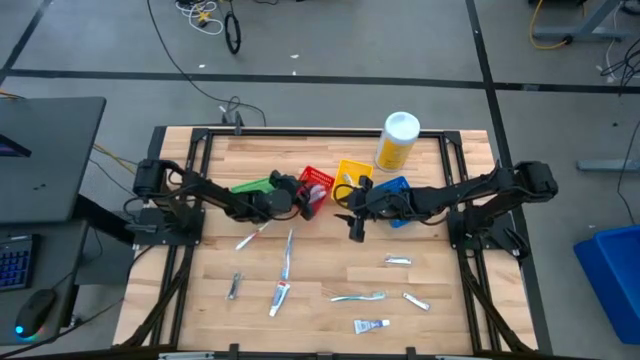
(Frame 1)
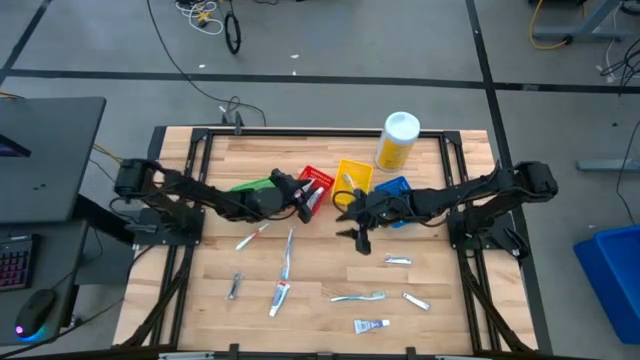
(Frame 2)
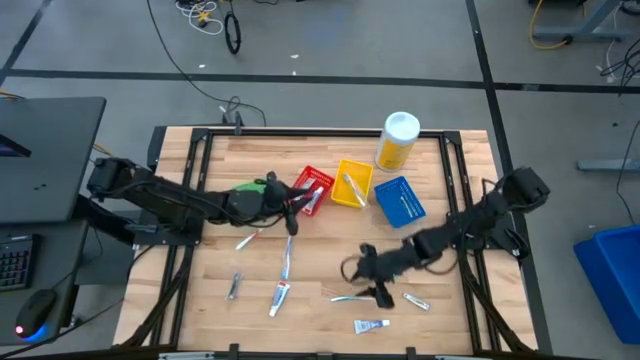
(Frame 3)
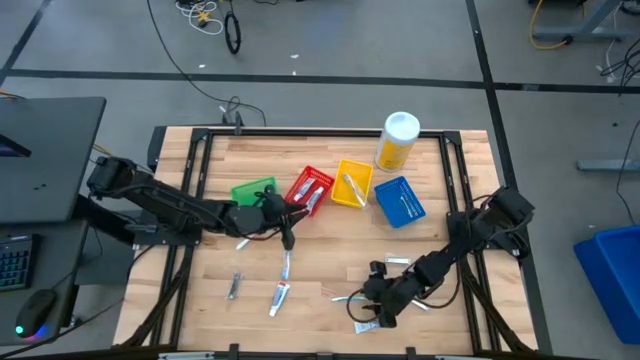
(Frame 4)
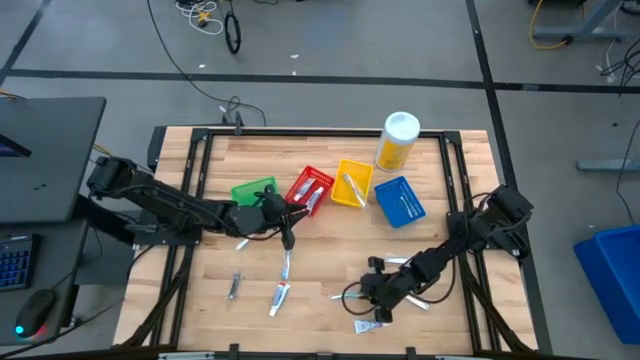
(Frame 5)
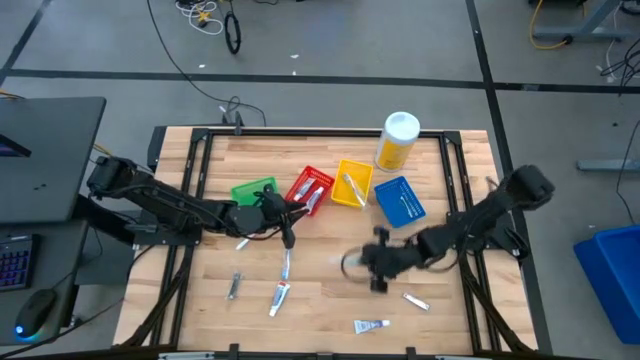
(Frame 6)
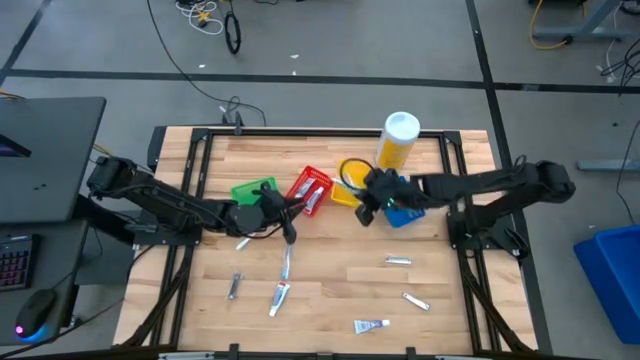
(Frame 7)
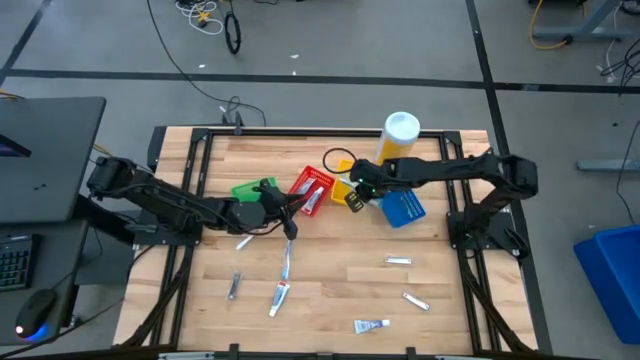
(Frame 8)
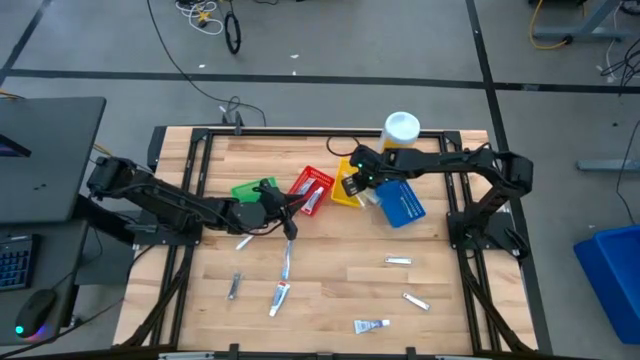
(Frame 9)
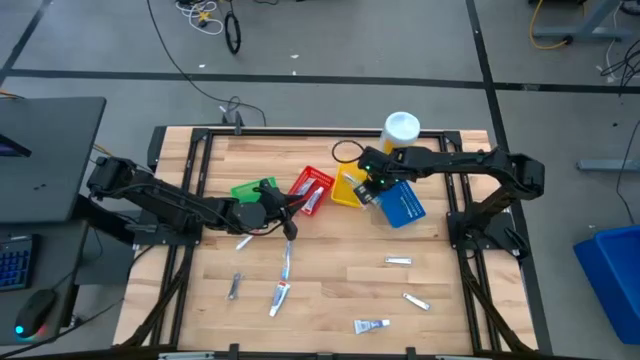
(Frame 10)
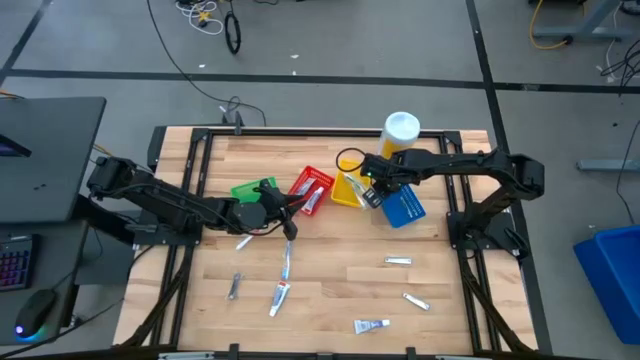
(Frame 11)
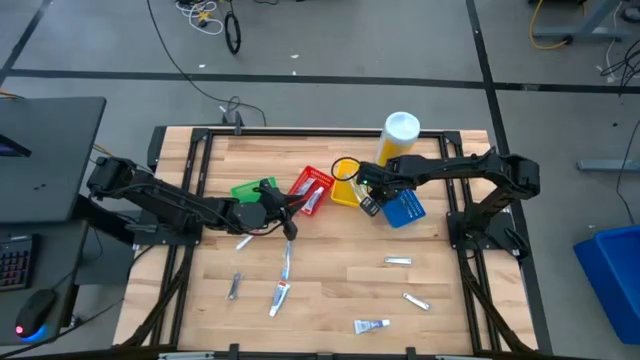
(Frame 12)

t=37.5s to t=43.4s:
Task: Pick & Place Travel size toiletries
Put the green toothbrush into the yellow bin

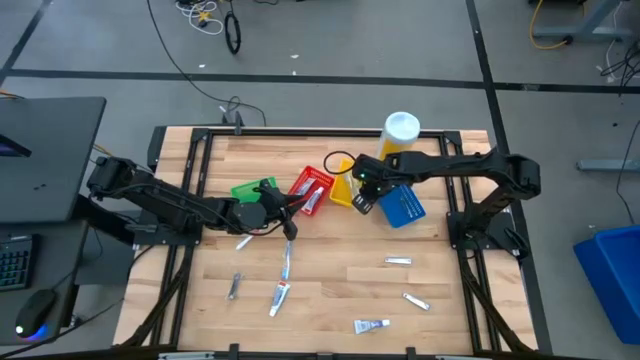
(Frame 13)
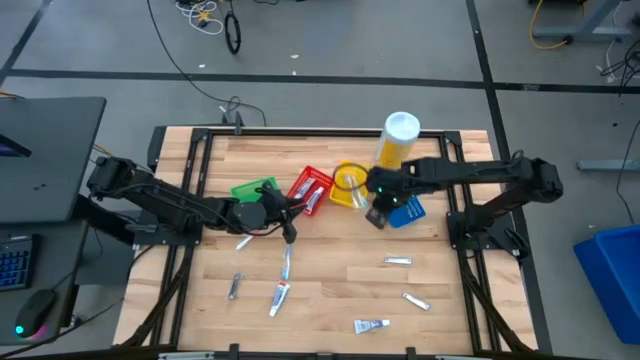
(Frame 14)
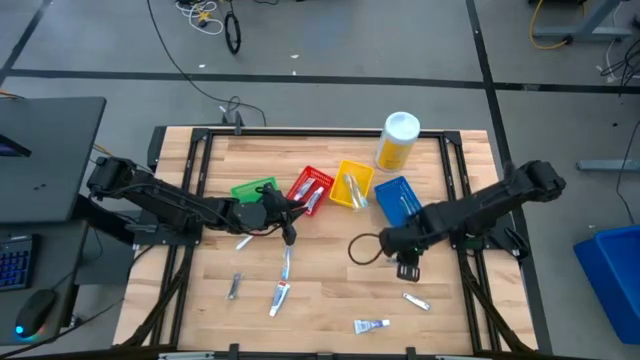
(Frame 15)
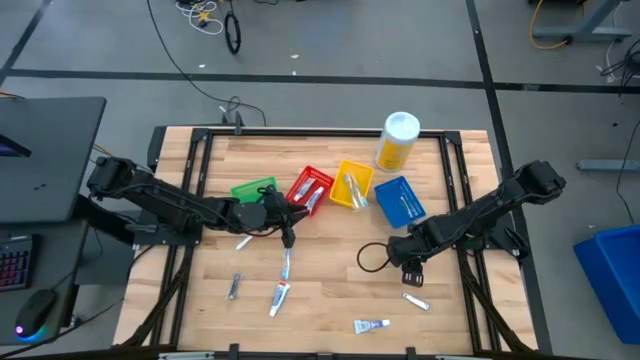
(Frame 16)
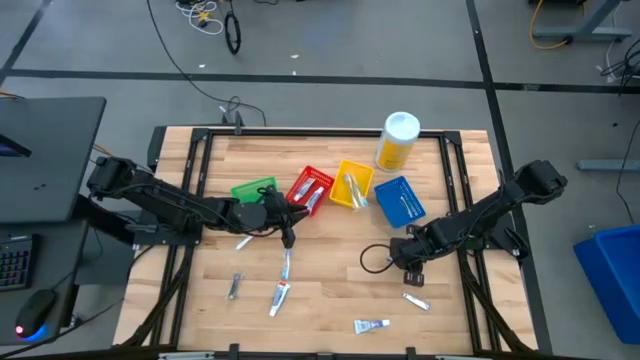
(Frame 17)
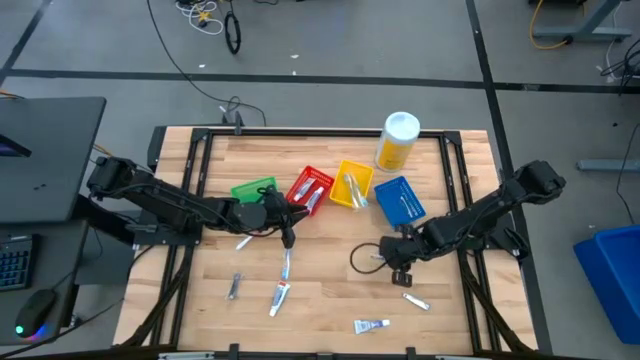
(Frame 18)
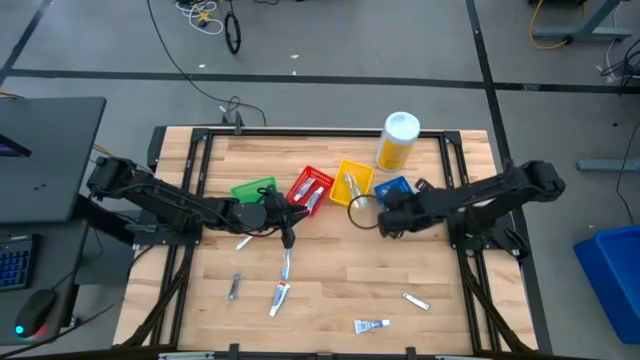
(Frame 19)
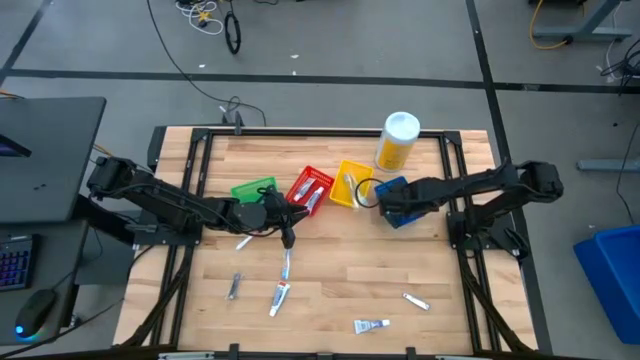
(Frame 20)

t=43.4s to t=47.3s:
Put the silver nail cutter into the blue bin

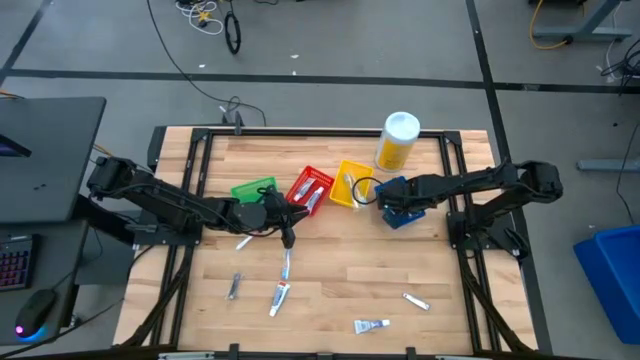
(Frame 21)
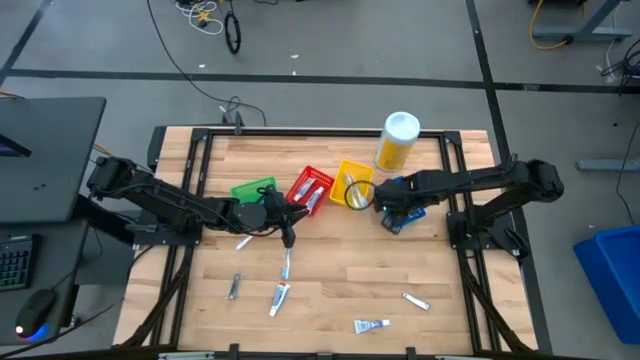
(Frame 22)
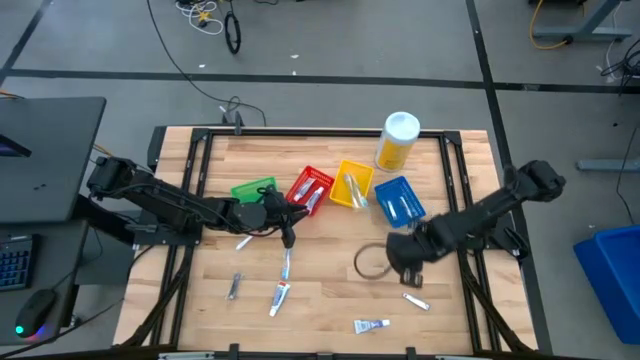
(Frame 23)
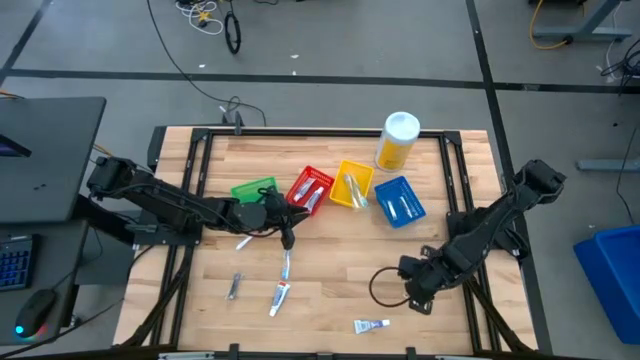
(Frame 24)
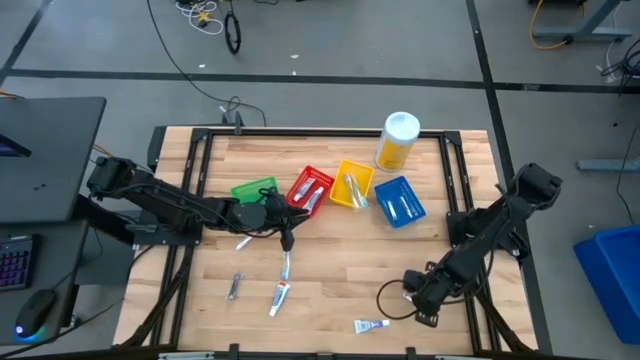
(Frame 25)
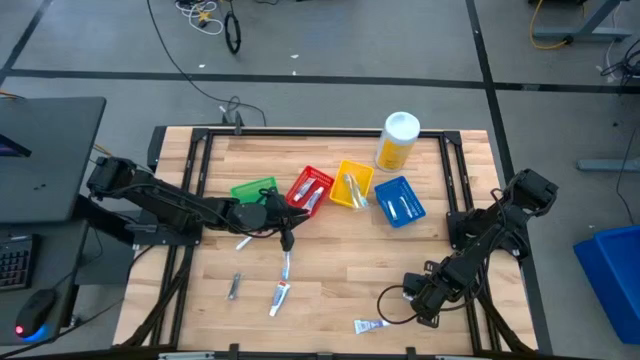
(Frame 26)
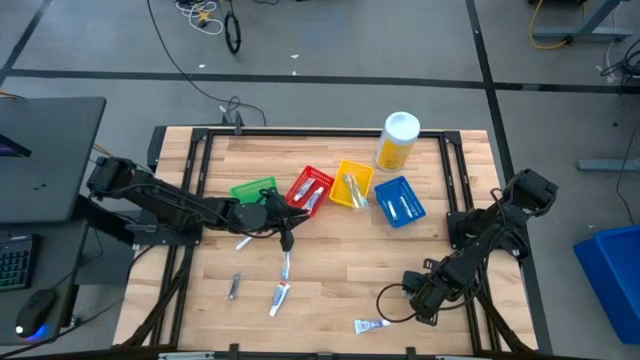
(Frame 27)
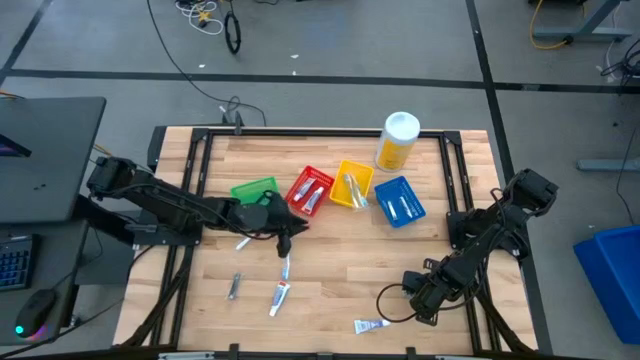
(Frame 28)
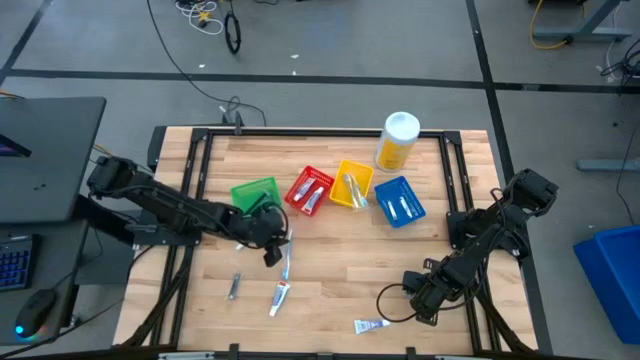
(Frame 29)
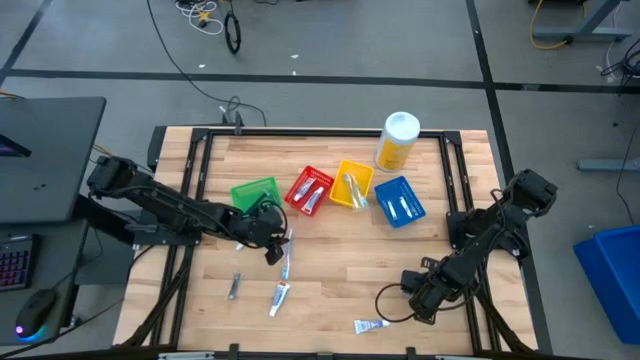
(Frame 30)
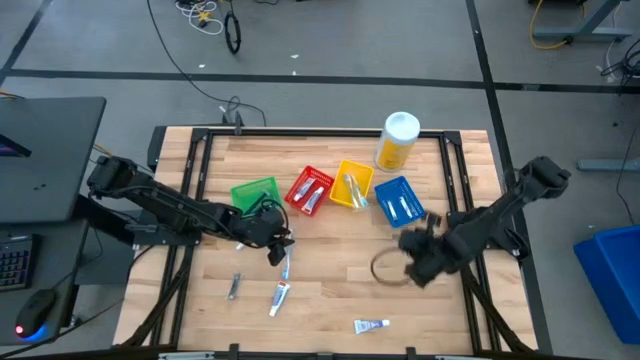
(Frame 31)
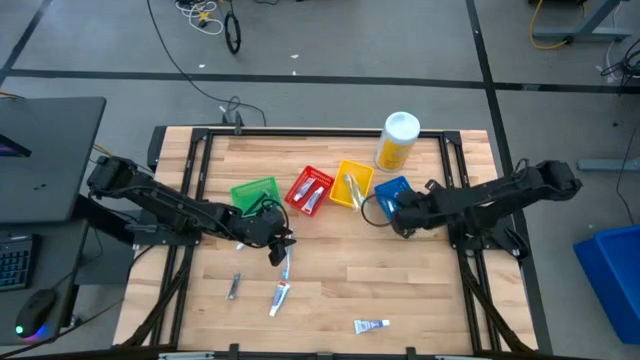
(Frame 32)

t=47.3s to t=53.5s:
Put the silver nail cutter into the blue bin

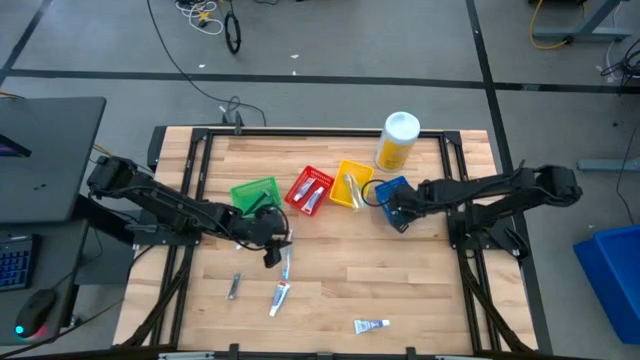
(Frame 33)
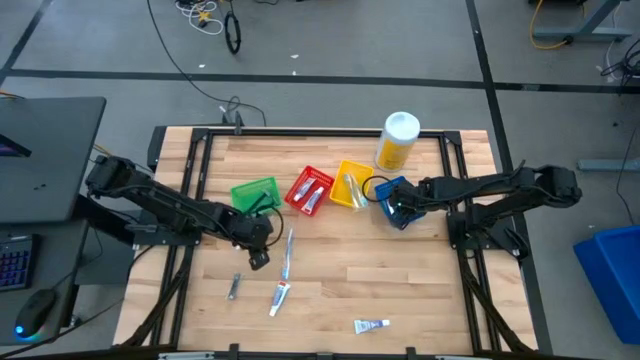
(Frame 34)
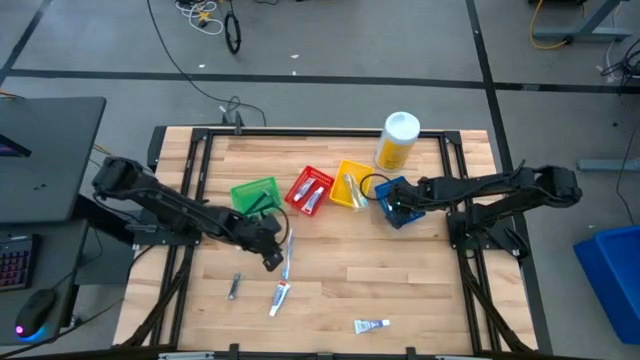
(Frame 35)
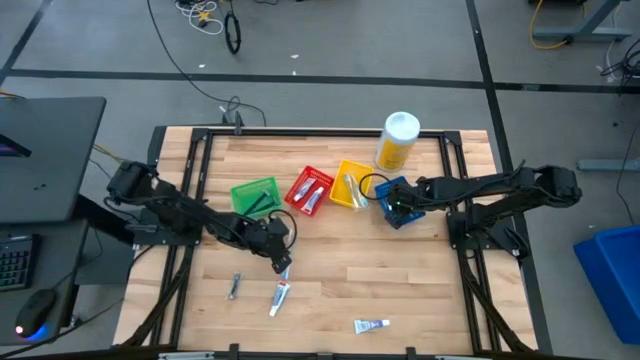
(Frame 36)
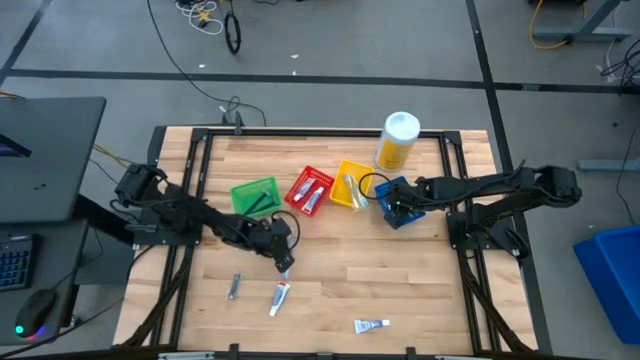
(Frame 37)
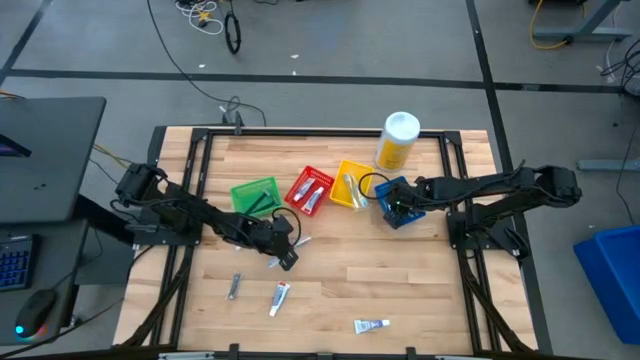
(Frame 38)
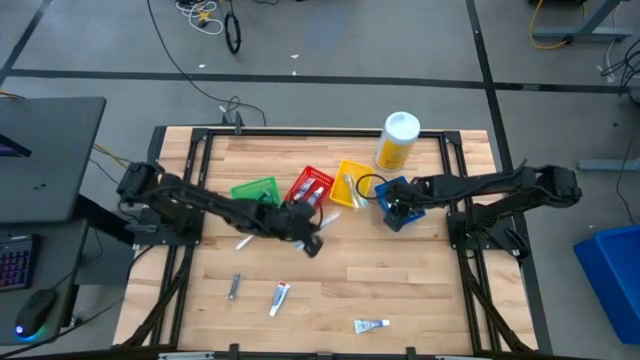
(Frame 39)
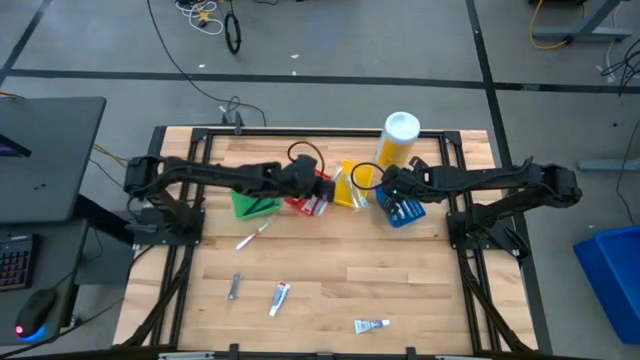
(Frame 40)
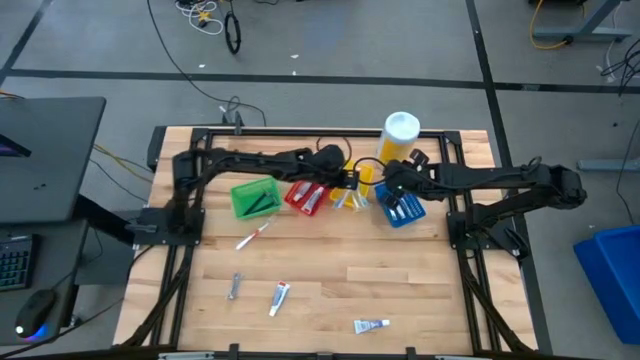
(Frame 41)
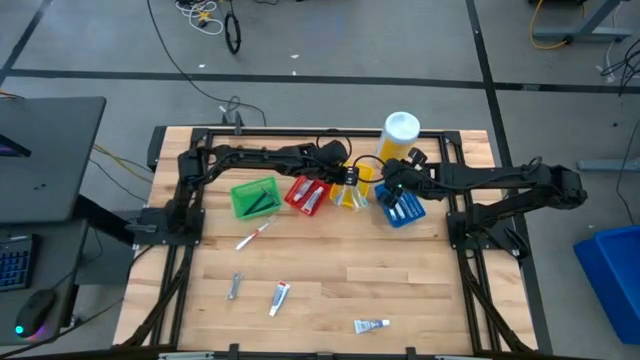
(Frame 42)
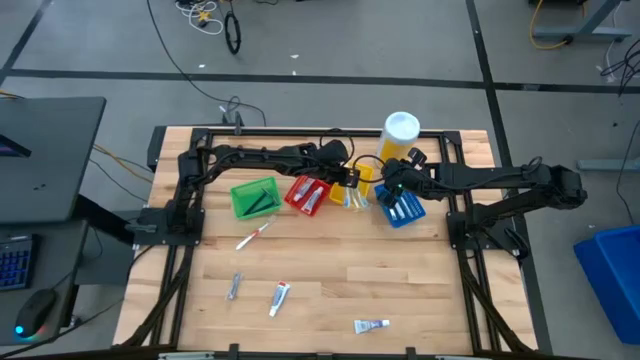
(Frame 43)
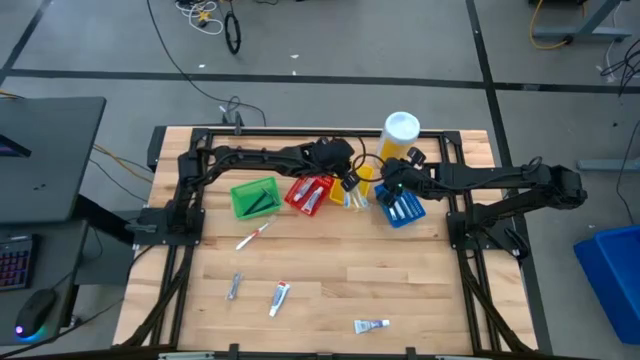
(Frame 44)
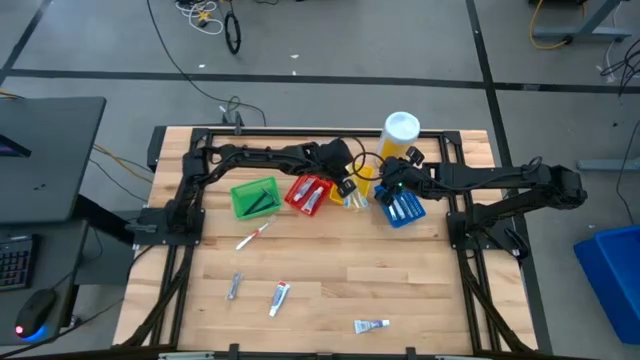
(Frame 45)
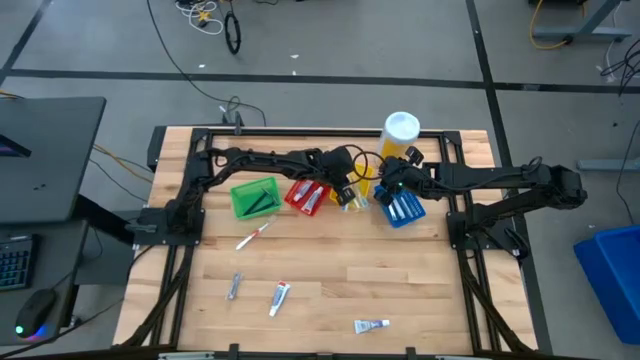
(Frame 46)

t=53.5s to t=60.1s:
Put the blue toothbrush into the yellow bin
